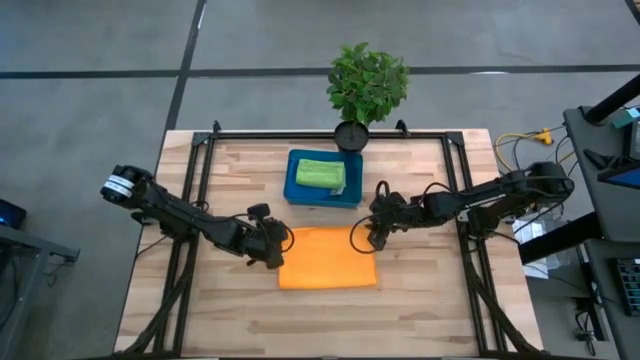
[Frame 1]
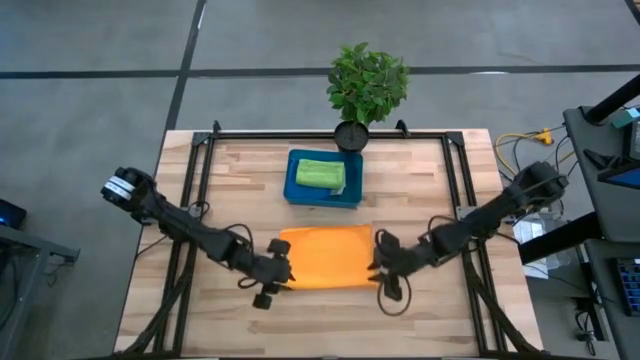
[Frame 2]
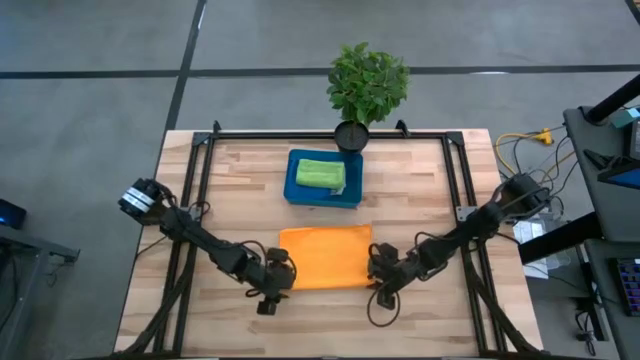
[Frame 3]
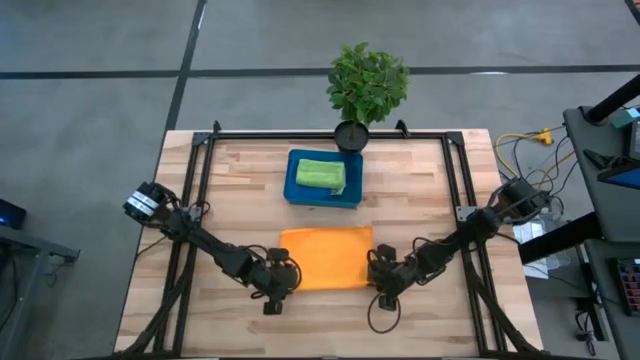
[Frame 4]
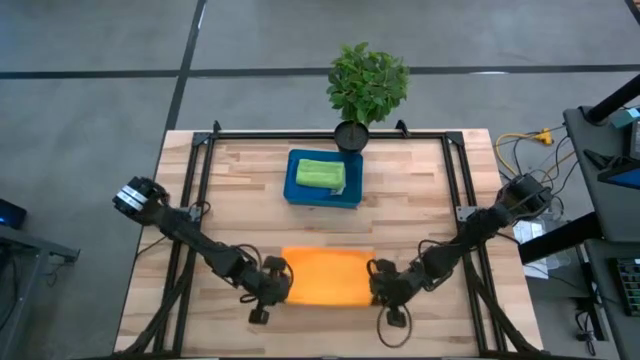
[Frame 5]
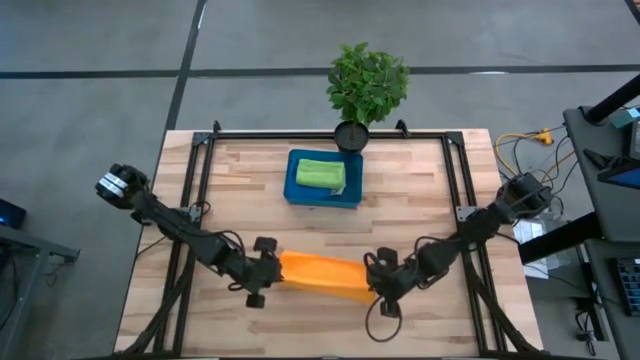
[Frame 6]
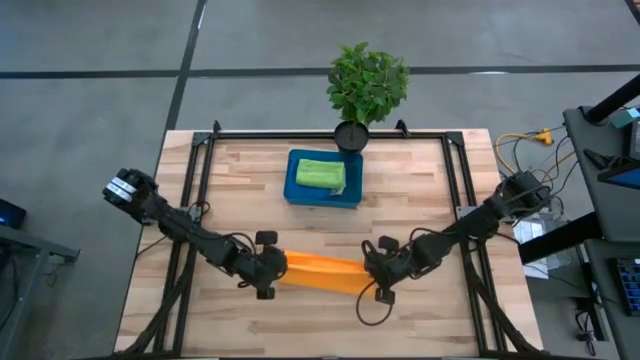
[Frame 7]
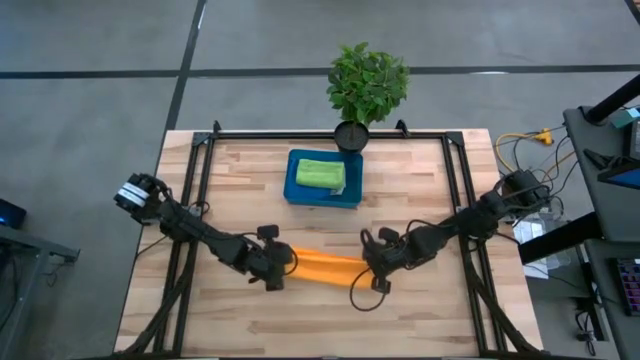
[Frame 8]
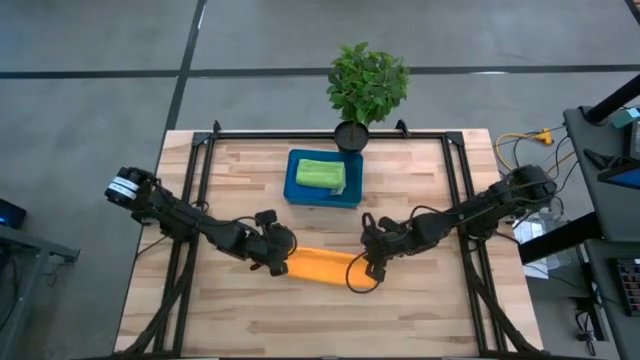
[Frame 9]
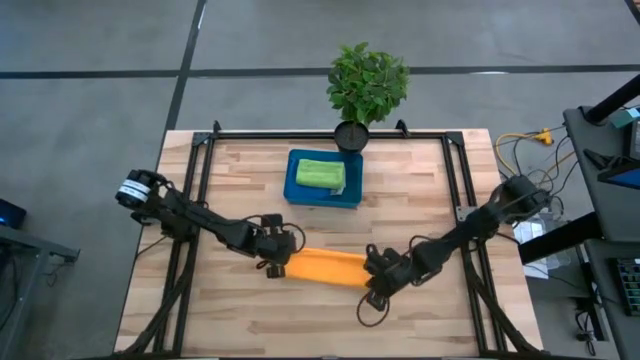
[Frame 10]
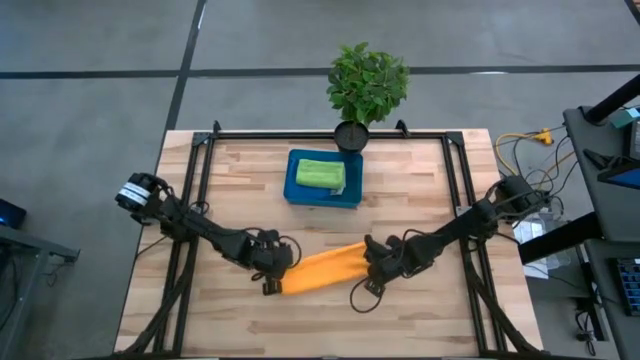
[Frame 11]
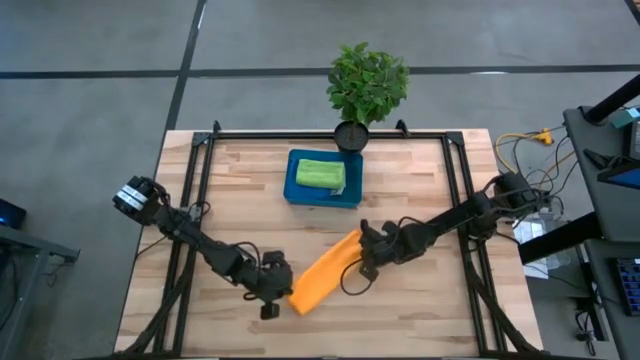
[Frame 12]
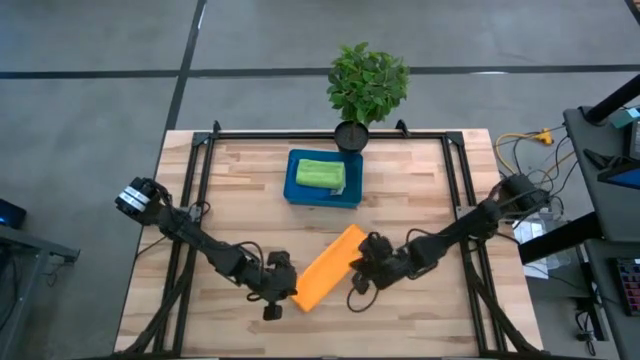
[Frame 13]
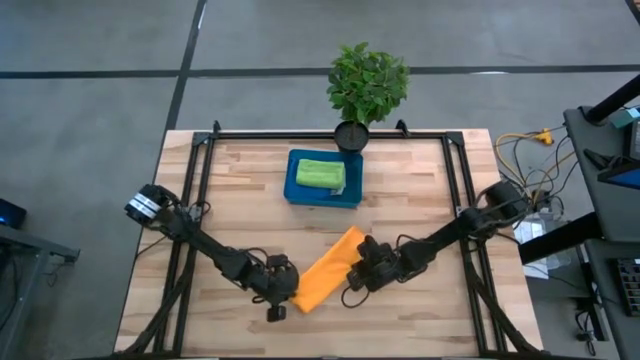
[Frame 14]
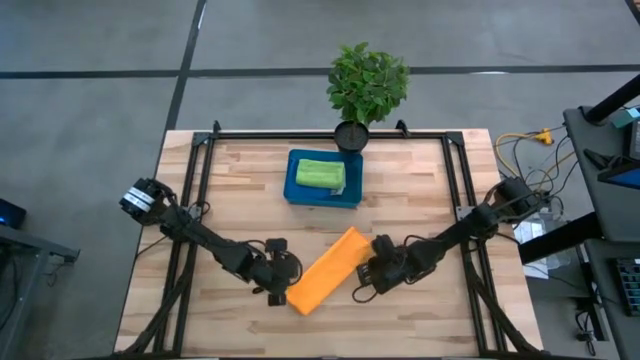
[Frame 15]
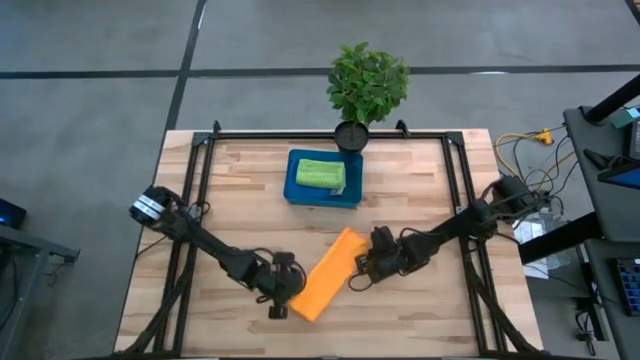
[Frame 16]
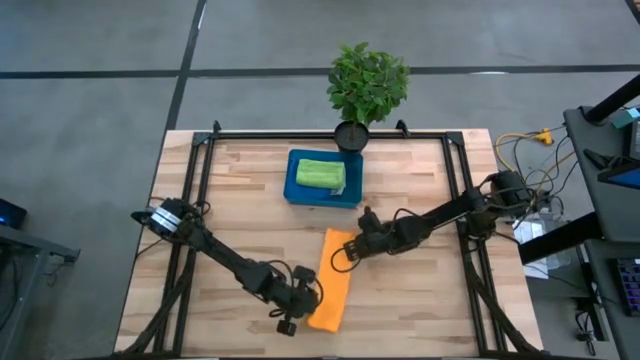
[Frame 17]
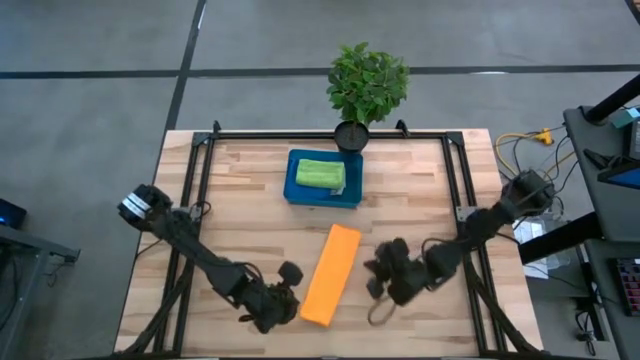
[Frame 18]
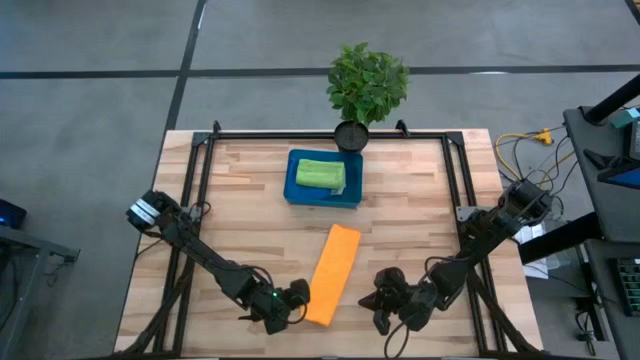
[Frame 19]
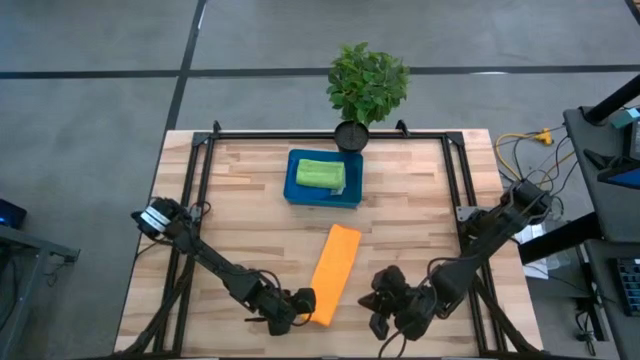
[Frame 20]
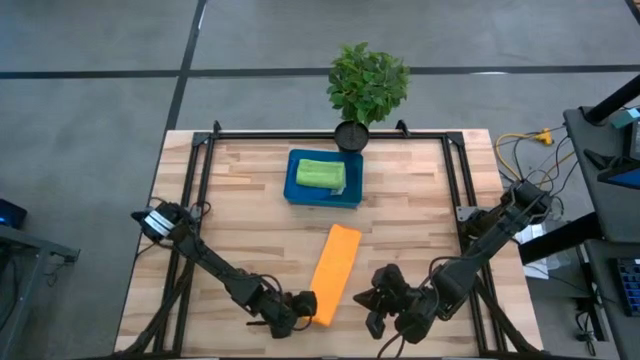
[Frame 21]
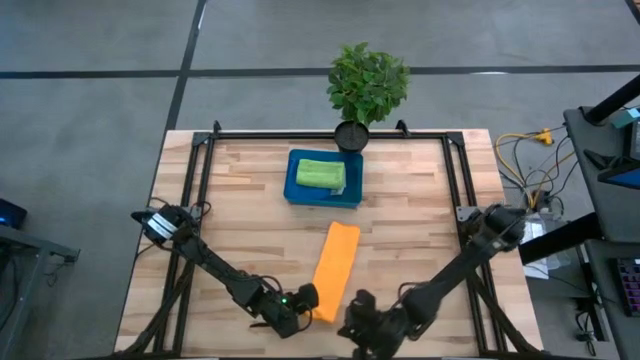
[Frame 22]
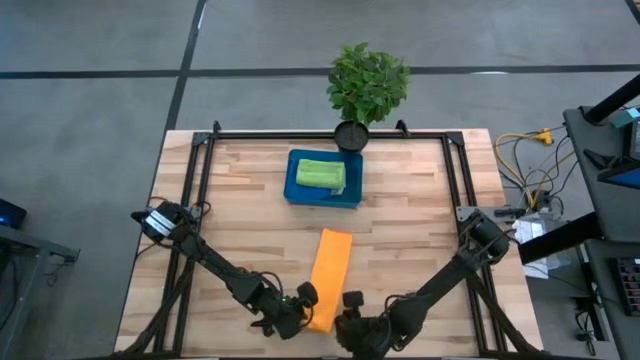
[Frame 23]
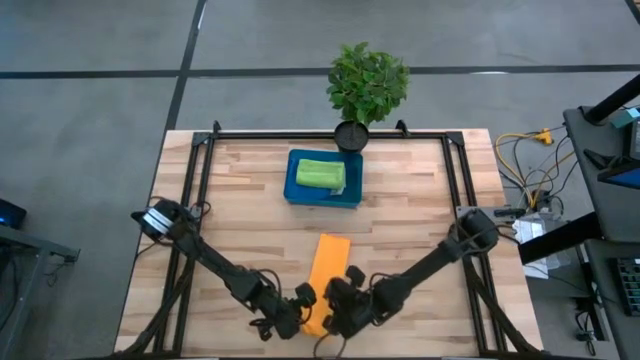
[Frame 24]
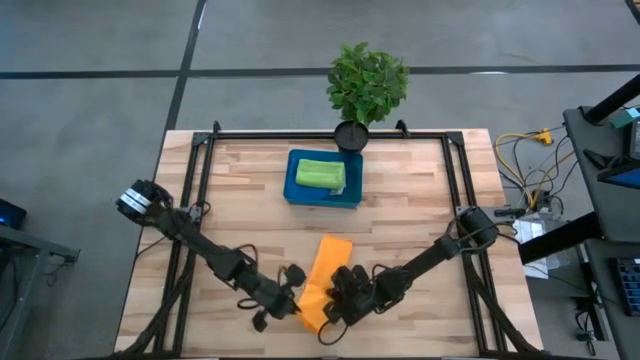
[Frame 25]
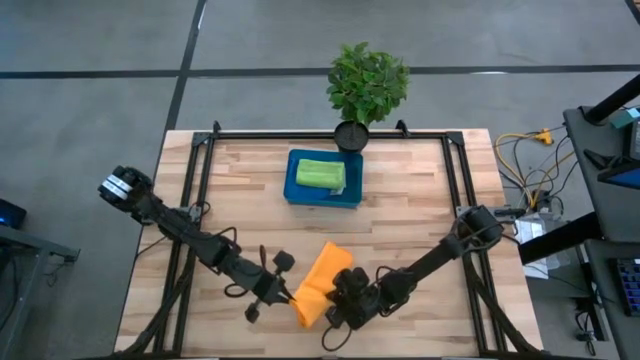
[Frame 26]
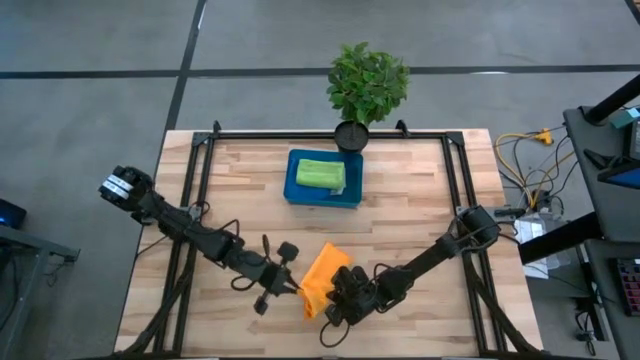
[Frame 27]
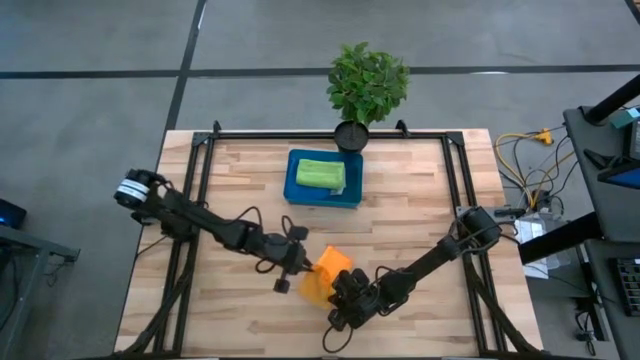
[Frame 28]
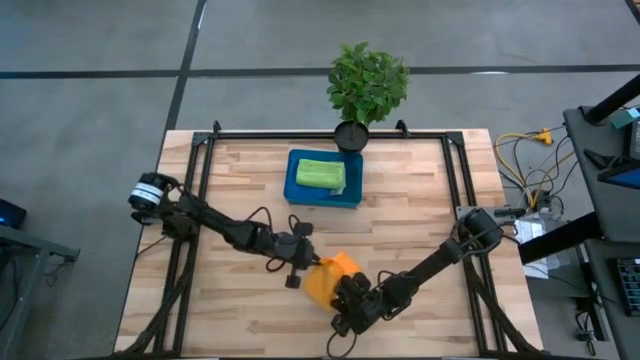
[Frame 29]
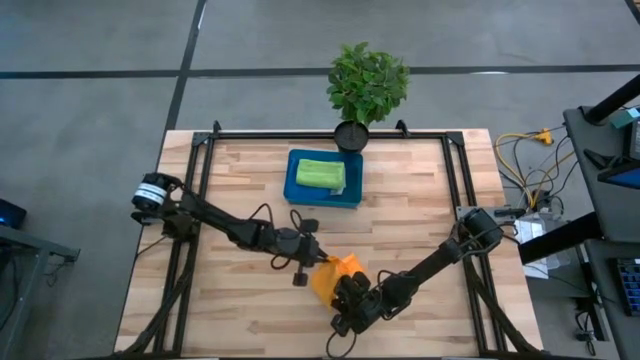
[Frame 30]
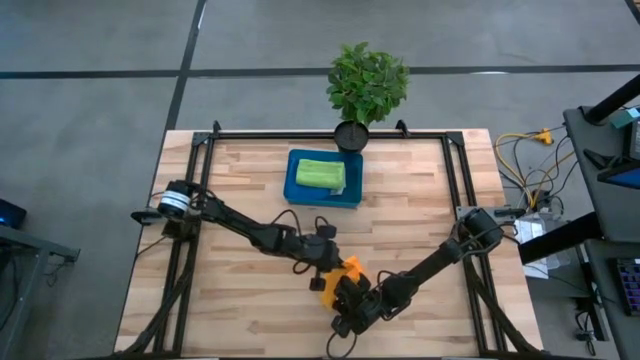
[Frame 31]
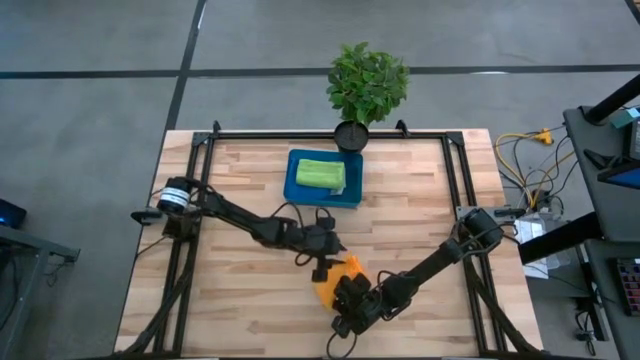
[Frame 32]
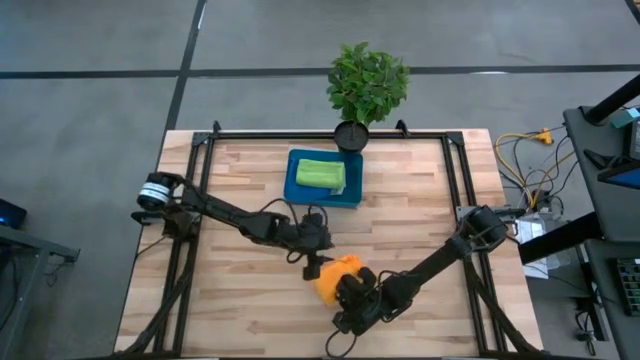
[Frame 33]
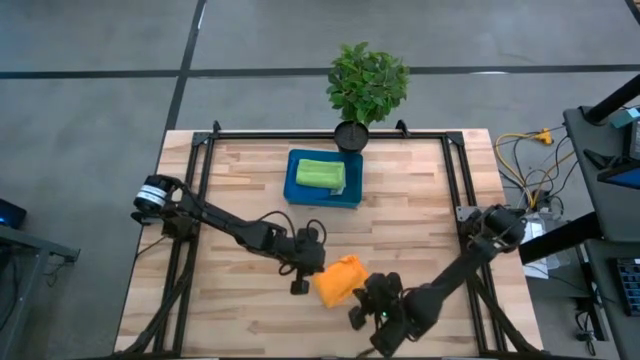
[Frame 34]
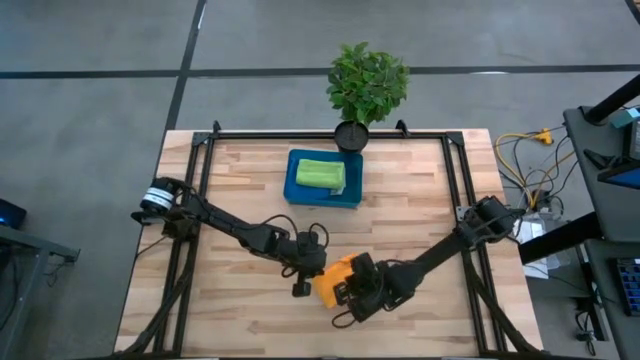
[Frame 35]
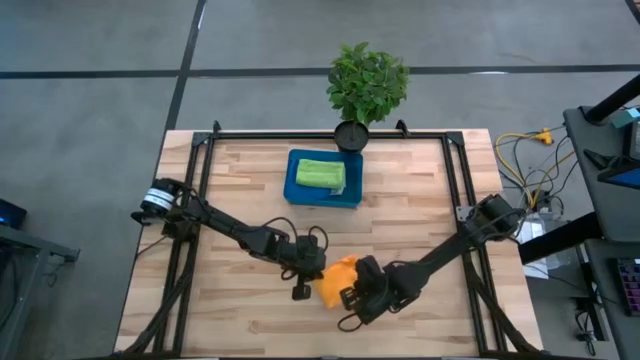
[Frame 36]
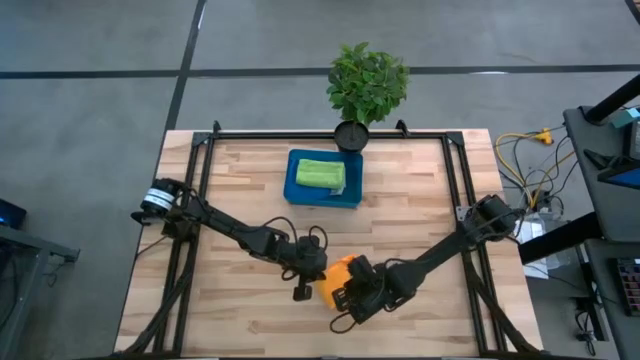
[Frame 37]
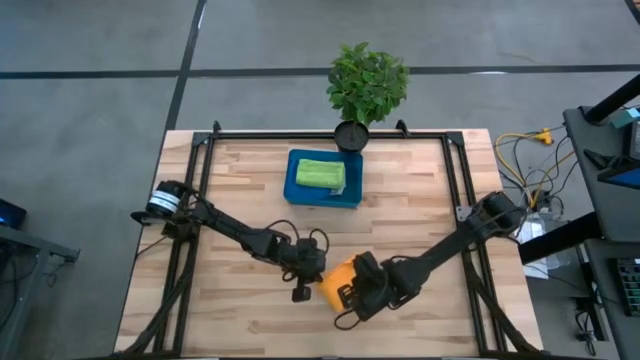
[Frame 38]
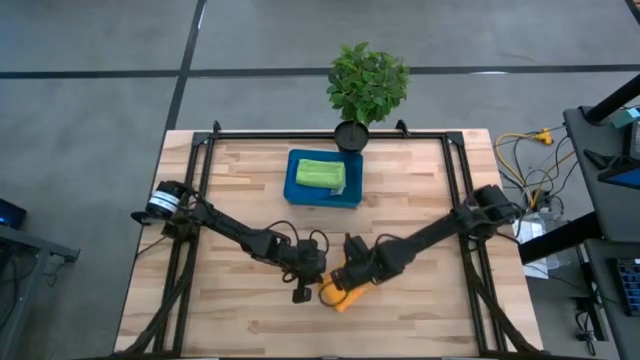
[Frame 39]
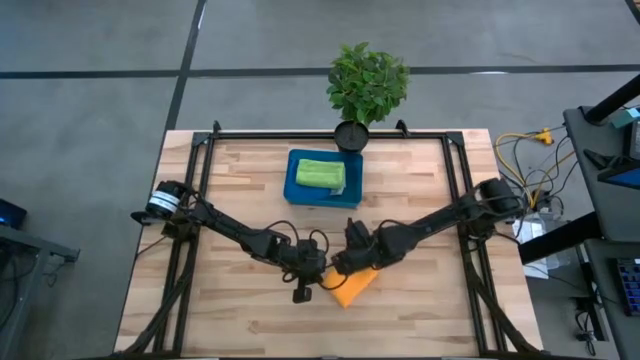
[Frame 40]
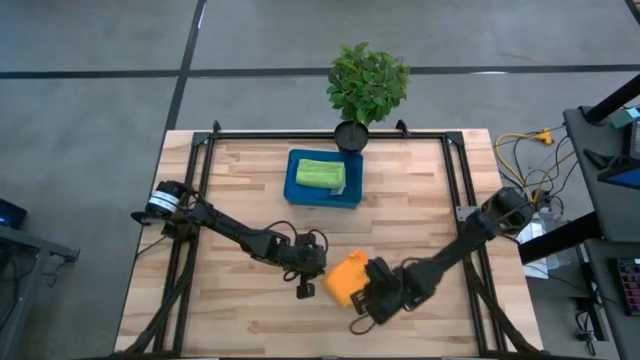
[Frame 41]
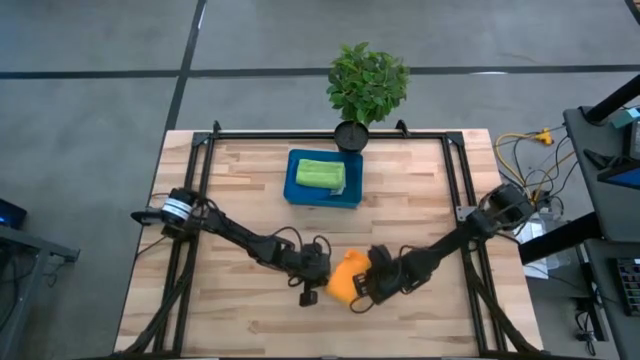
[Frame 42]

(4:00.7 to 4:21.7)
Task: Fold microfiber towels
Fold the yellow microfiber towel
